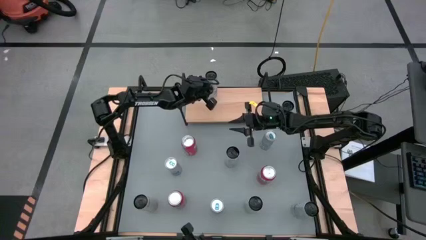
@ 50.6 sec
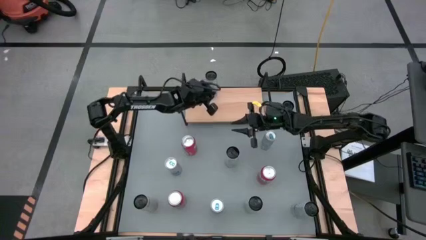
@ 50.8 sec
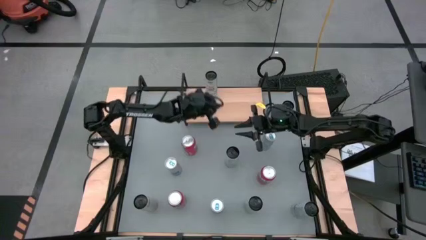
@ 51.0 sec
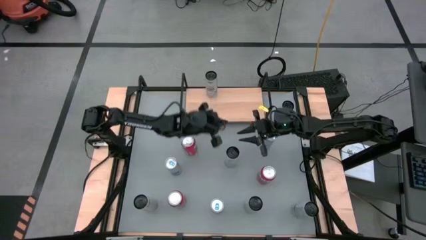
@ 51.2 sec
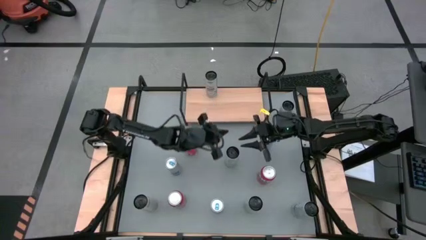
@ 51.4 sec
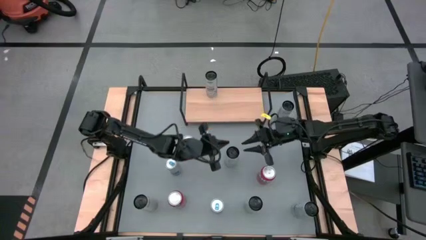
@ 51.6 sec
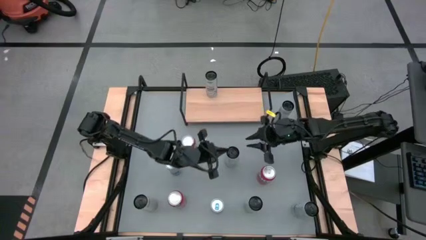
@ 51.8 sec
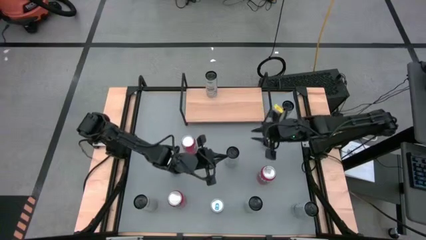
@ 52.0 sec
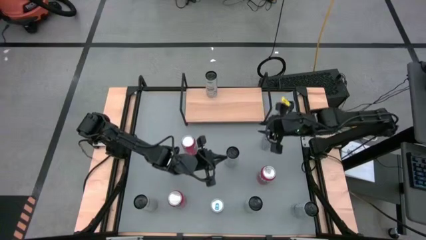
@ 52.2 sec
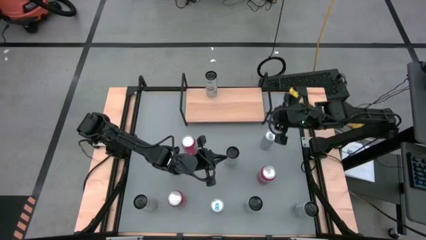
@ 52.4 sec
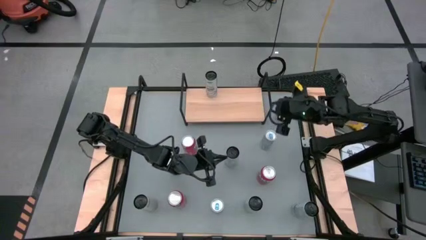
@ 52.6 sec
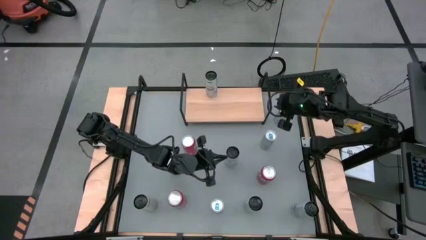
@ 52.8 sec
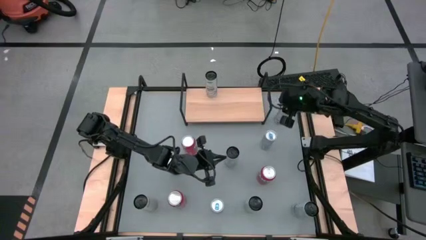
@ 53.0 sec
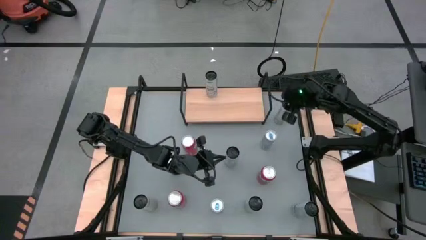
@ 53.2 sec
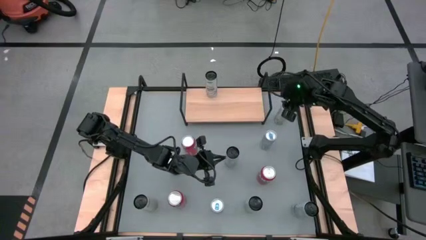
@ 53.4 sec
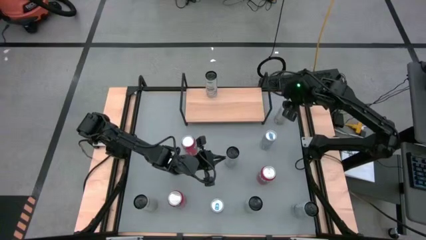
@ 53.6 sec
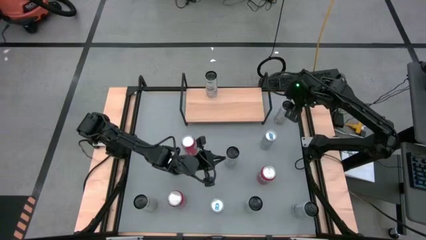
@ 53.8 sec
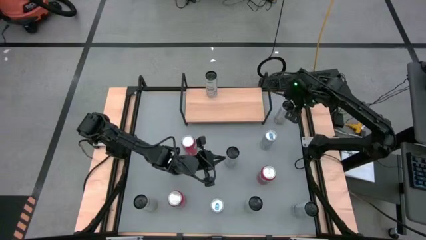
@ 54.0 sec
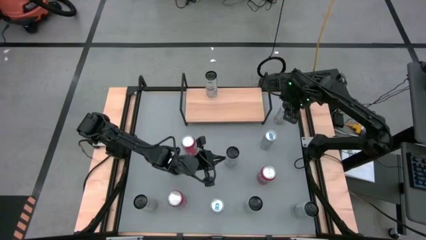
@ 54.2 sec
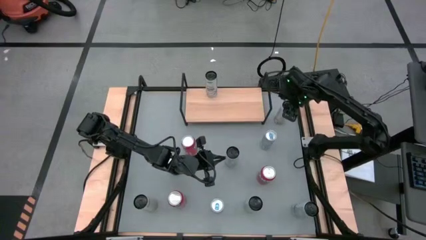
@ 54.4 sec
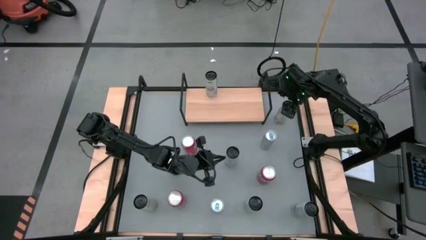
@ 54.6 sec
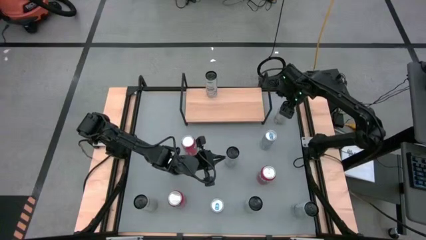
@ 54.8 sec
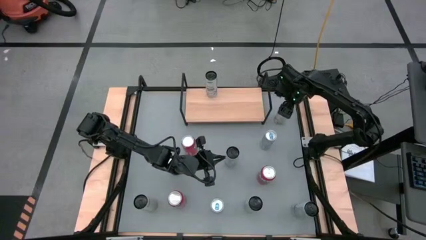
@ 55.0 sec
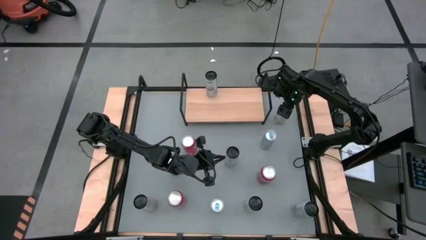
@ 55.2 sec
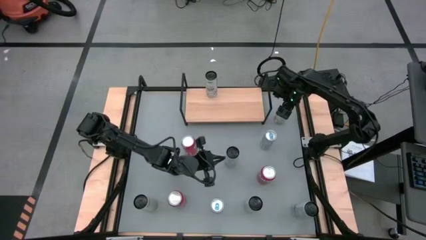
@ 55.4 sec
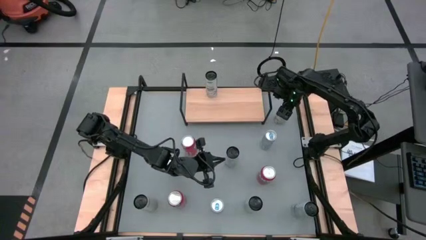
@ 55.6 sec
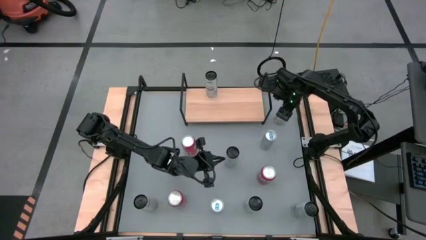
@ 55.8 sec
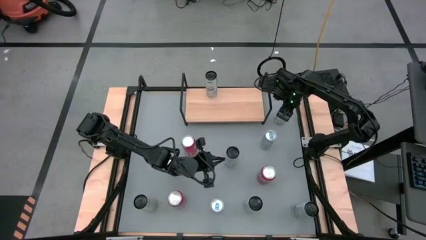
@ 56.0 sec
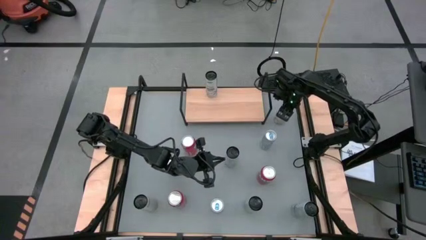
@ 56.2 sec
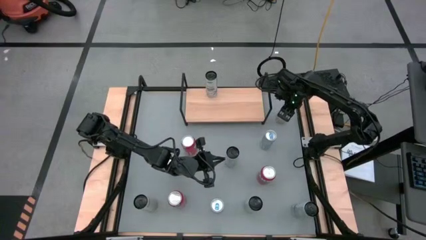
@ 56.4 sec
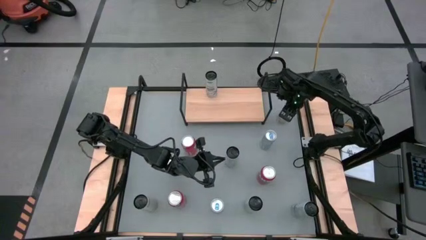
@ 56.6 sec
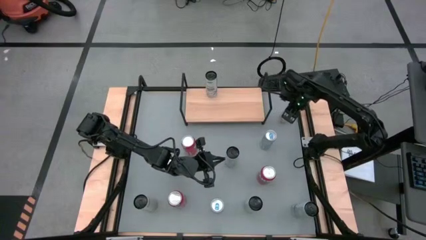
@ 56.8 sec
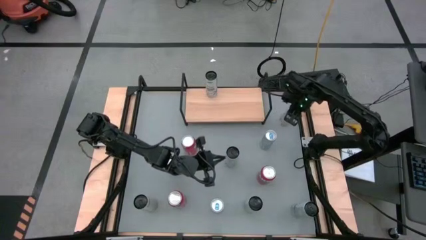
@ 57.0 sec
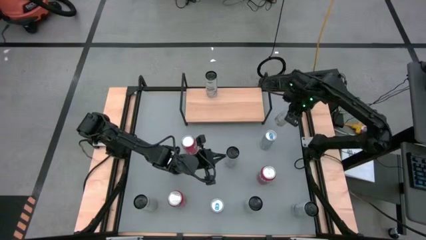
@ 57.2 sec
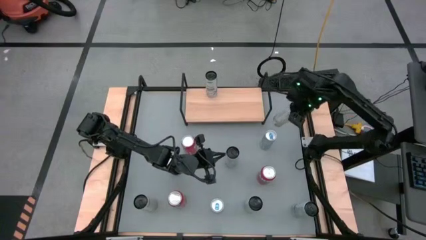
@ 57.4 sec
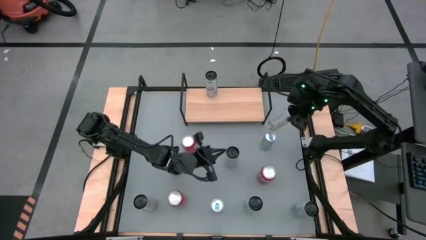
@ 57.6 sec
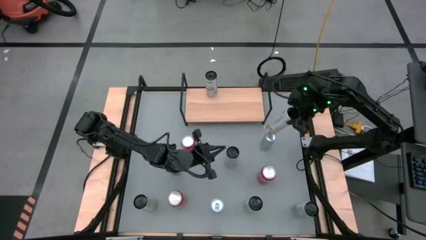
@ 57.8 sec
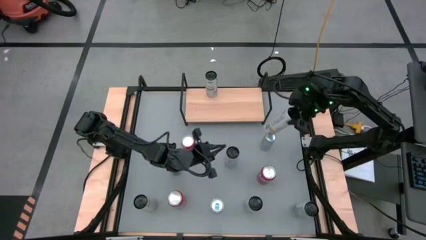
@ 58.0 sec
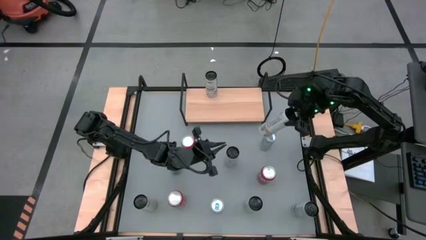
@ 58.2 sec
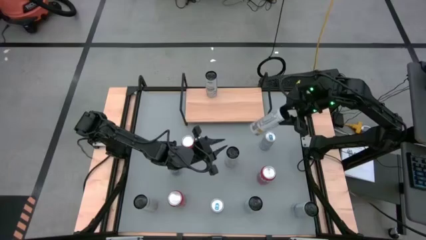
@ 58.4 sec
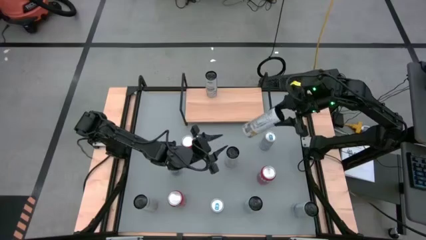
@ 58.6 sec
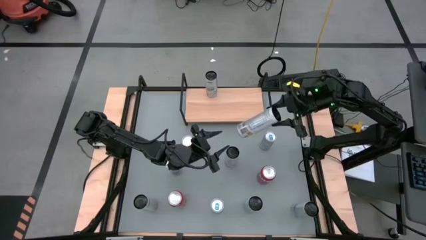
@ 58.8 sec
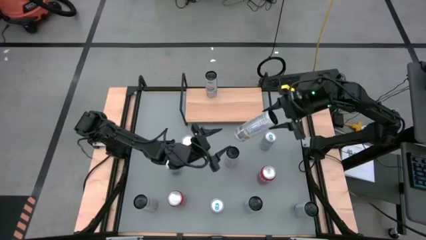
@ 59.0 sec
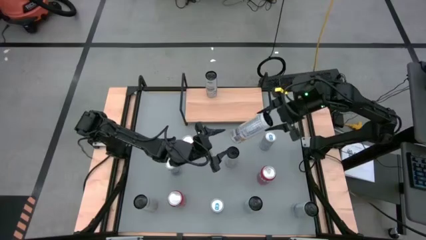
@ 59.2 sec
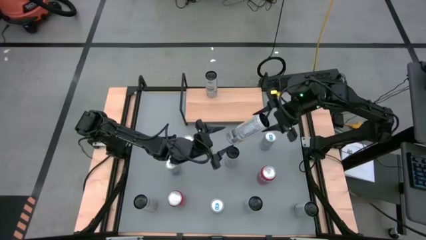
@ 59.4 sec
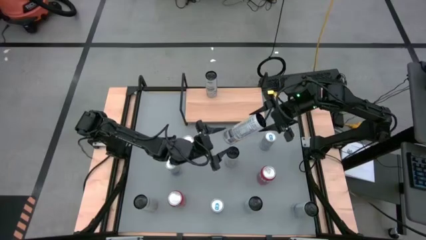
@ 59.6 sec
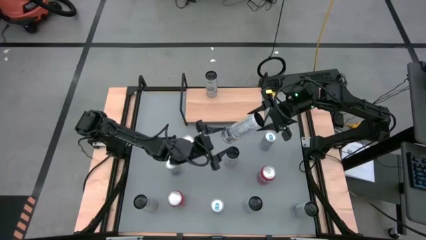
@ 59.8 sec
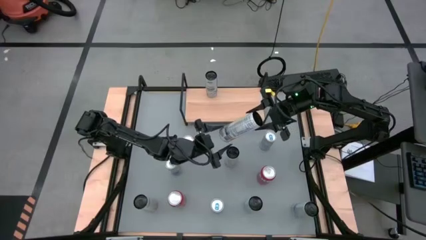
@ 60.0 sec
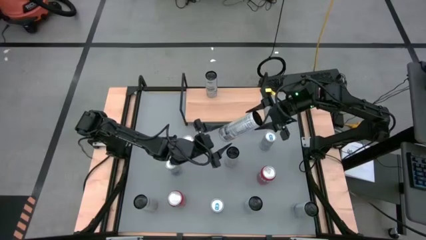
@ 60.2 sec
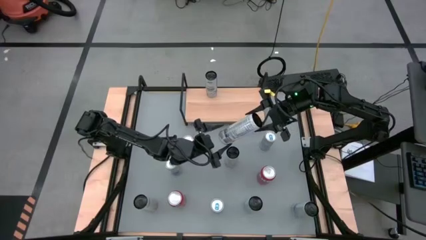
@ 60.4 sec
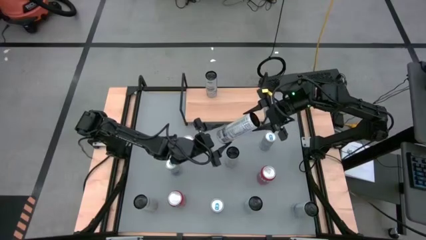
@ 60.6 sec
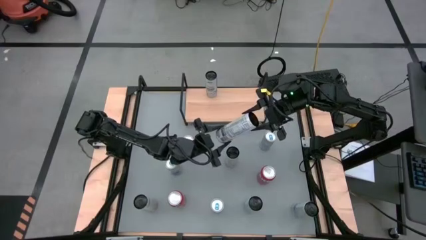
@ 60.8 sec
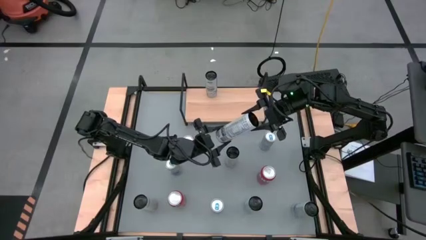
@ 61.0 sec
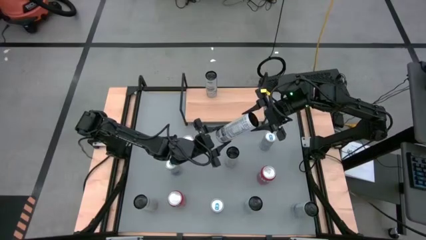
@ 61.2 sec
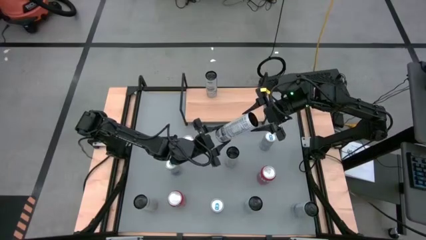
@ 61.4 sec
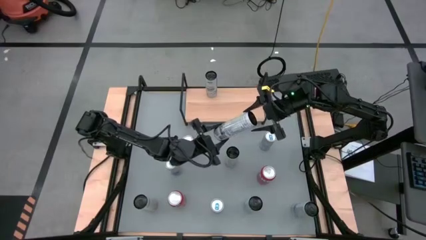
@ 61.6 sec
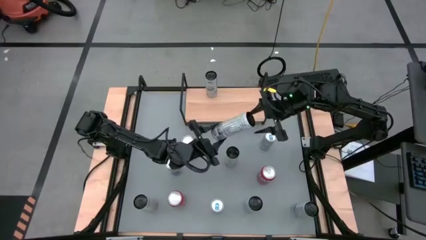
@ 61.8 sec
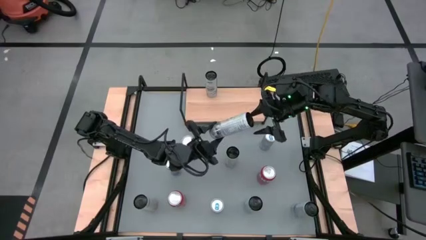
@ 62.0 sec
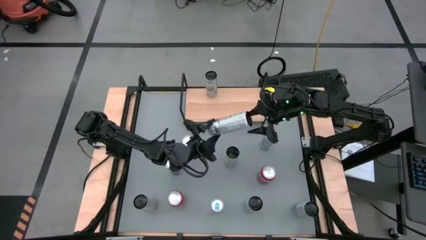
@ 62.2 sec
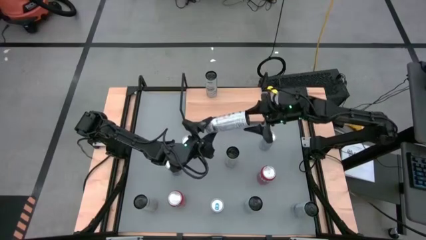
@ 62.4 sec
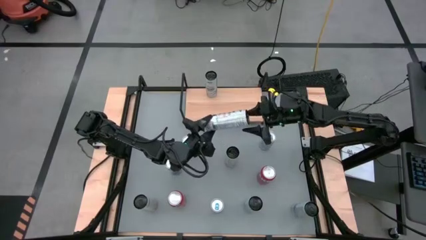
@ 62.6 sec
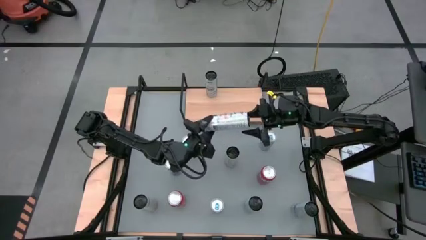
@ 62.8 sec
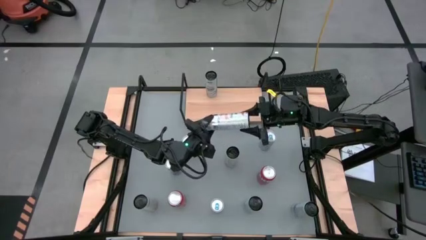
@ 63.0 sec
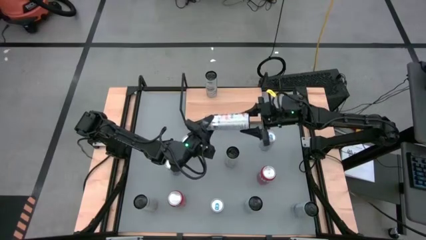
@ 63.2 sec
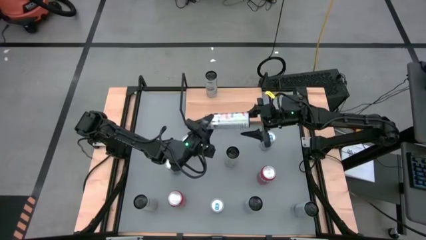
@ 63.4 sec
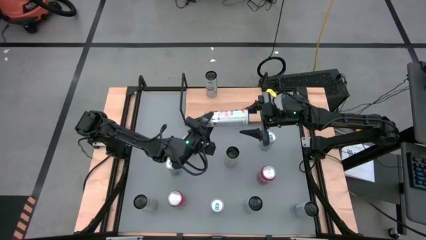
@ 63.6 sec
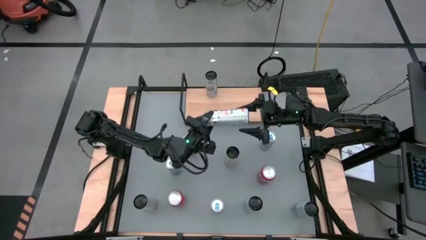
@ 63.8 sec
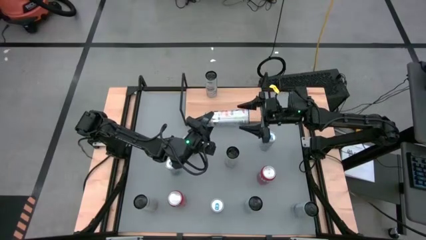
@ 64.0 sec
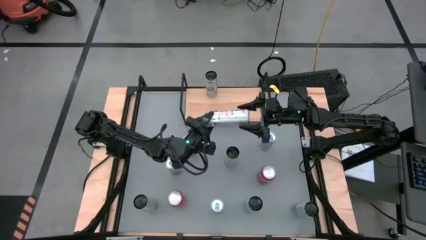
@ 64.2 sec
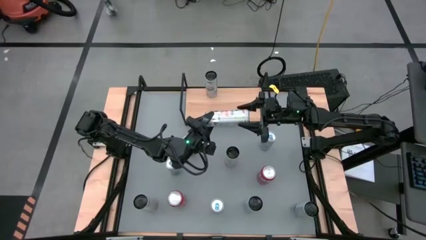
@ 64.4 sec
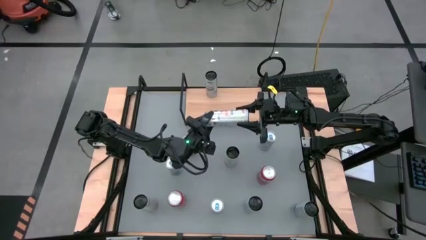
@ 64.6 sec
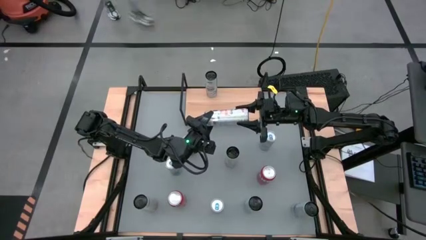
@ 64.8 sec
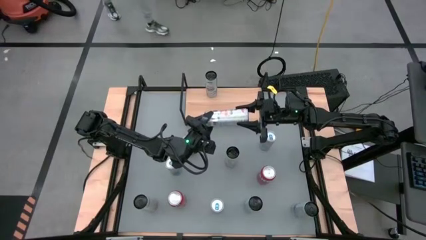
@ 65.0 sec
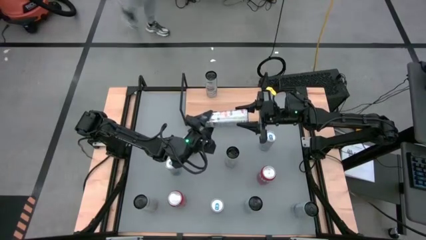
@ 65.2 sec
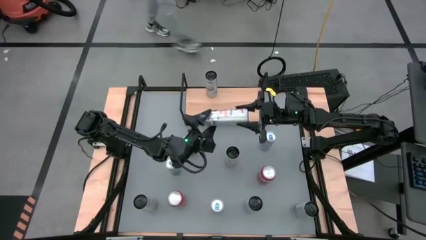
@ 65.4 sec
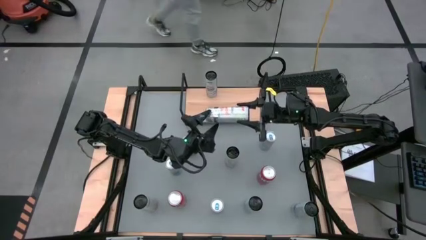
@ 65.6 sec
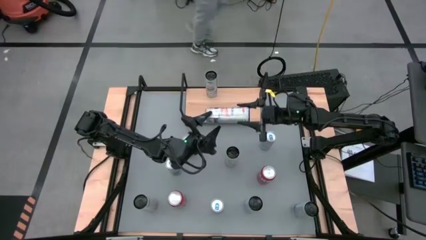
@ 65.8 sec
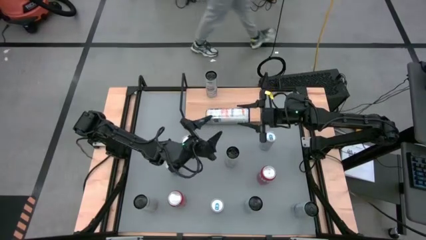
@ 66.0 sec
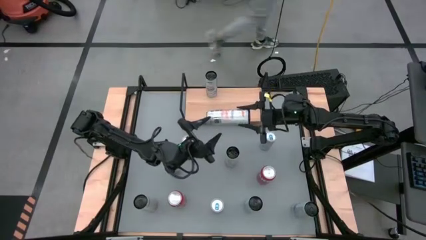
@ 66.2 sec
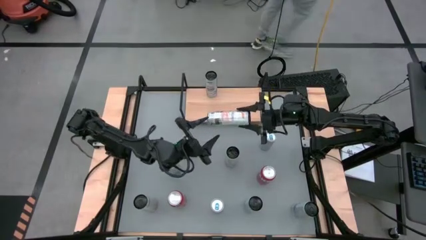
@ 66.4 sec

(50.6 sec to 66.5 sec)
Task: Place canned beverage on shelf
Put the top right white yellow soda can on the shelf
